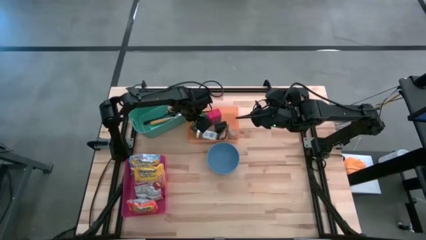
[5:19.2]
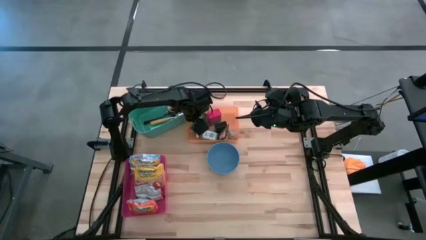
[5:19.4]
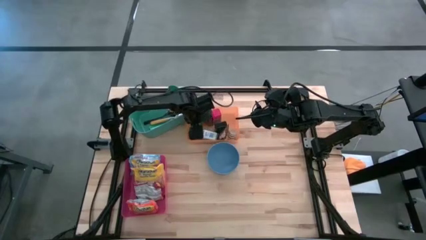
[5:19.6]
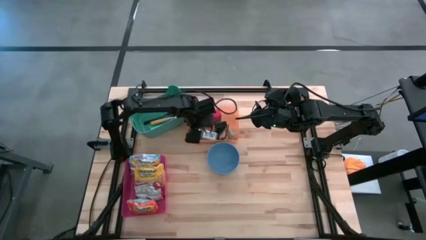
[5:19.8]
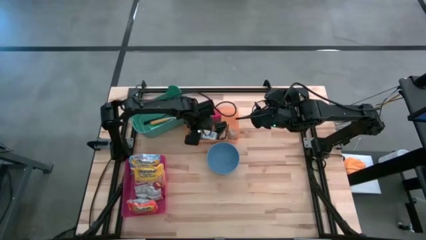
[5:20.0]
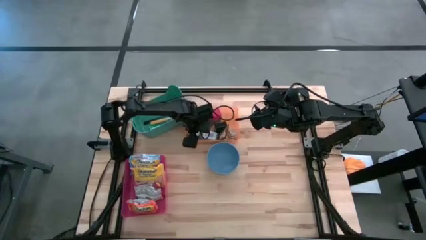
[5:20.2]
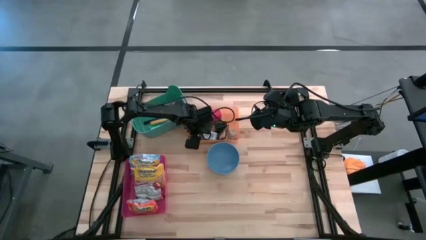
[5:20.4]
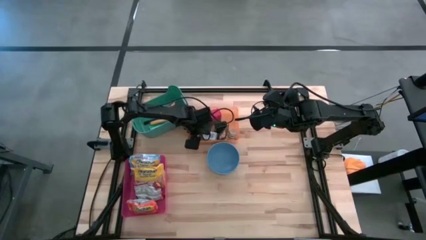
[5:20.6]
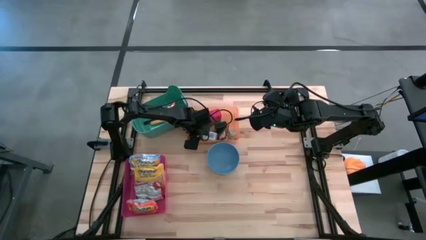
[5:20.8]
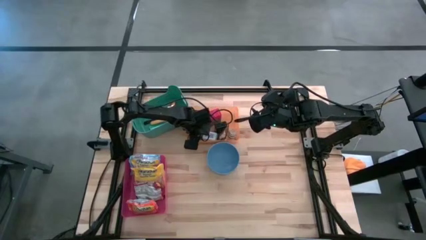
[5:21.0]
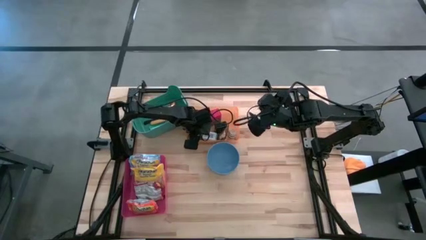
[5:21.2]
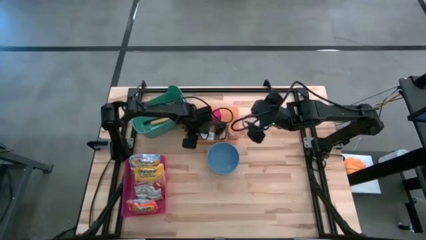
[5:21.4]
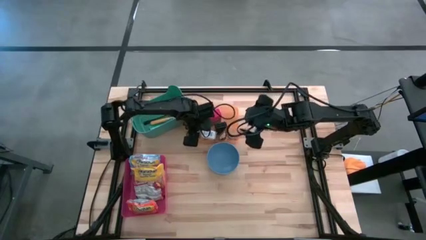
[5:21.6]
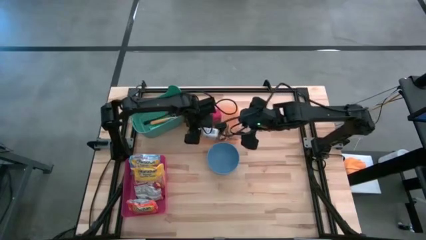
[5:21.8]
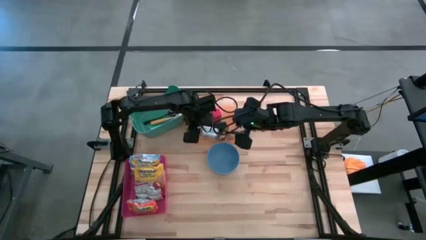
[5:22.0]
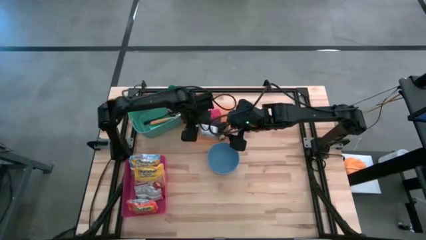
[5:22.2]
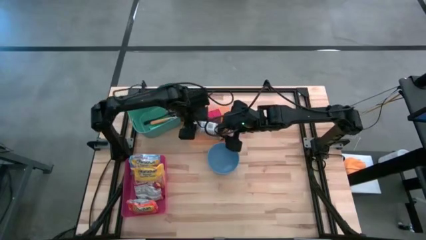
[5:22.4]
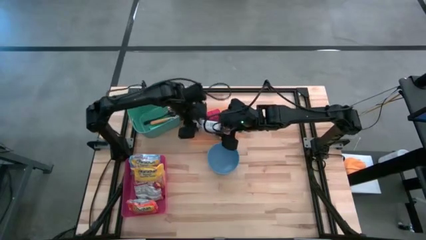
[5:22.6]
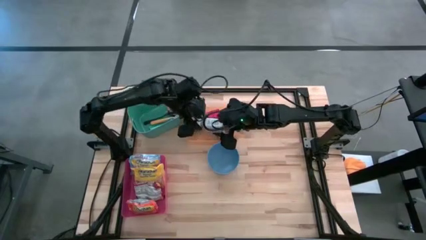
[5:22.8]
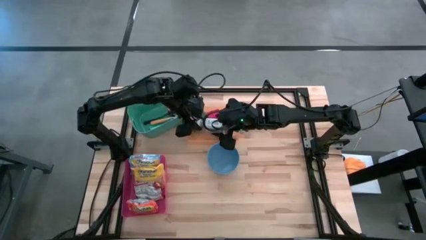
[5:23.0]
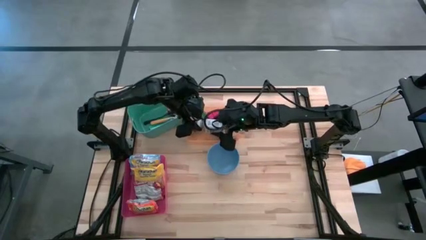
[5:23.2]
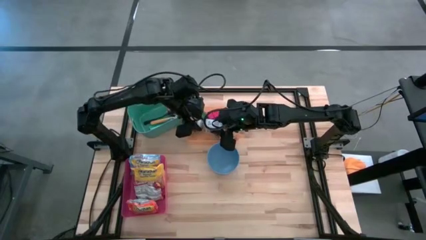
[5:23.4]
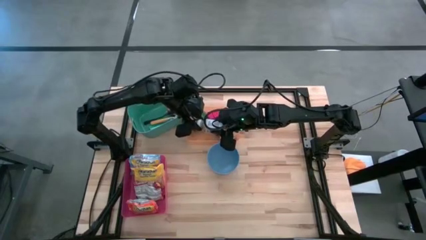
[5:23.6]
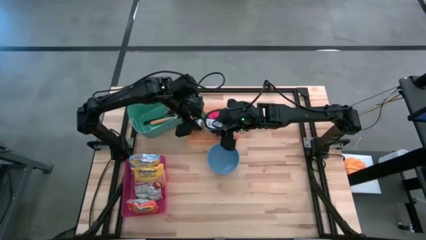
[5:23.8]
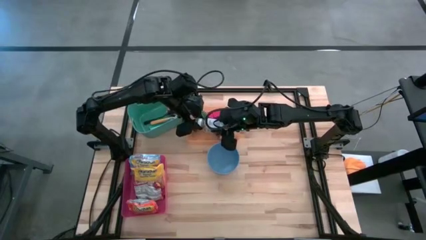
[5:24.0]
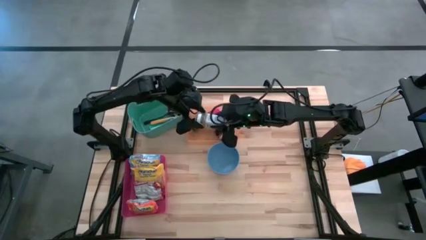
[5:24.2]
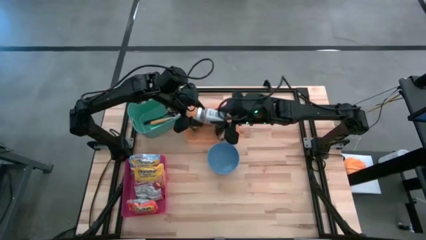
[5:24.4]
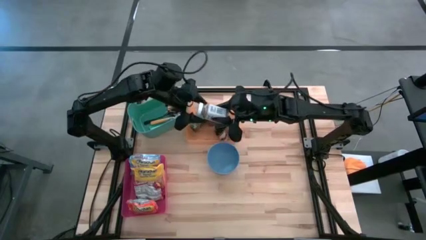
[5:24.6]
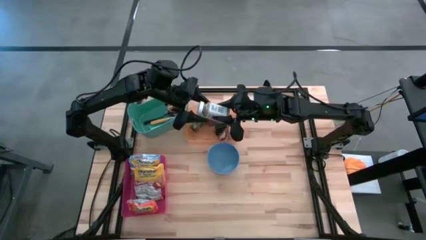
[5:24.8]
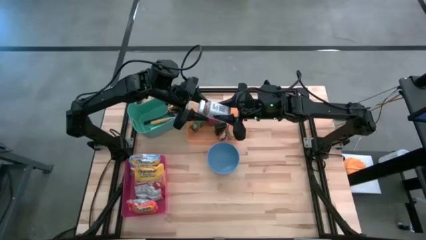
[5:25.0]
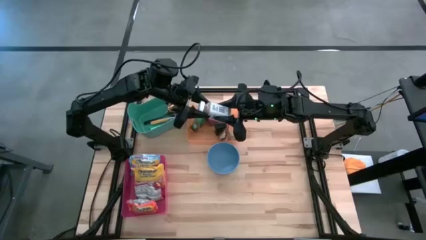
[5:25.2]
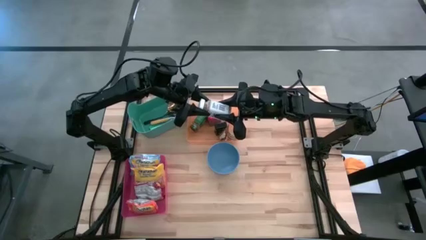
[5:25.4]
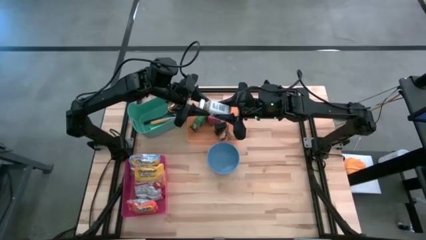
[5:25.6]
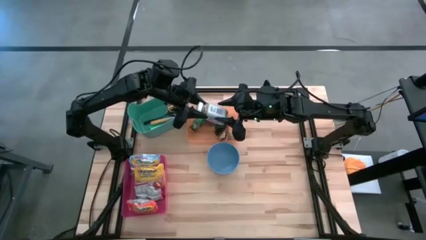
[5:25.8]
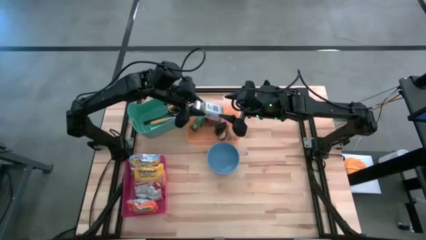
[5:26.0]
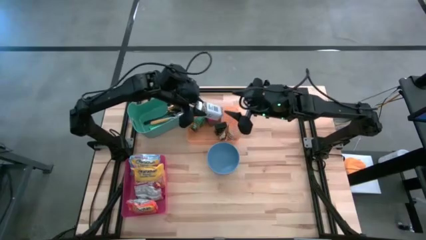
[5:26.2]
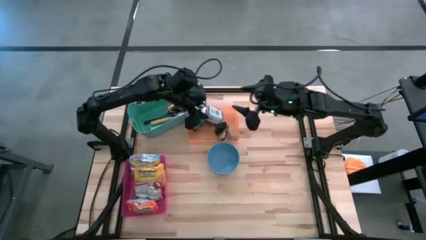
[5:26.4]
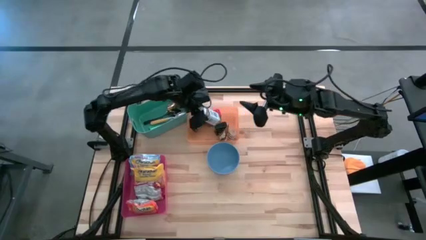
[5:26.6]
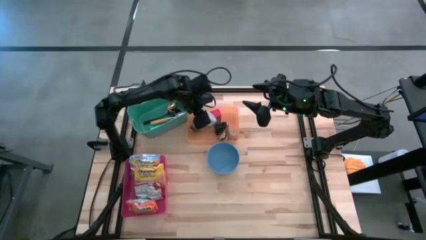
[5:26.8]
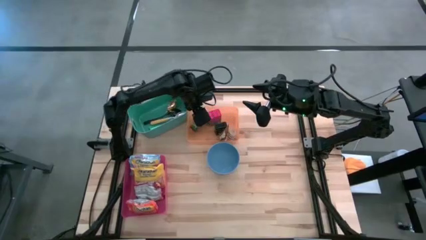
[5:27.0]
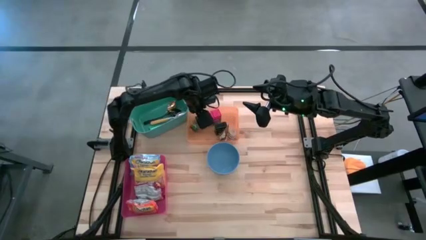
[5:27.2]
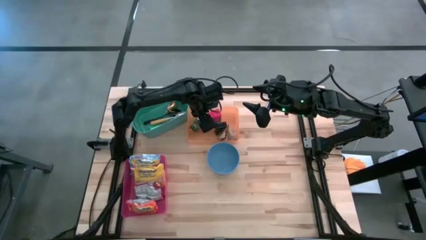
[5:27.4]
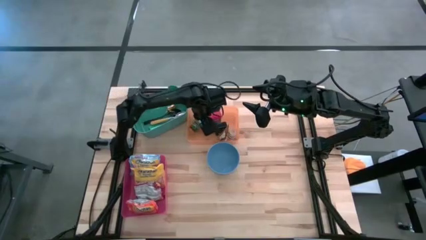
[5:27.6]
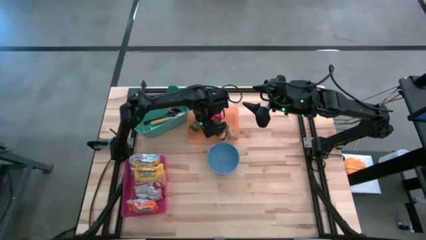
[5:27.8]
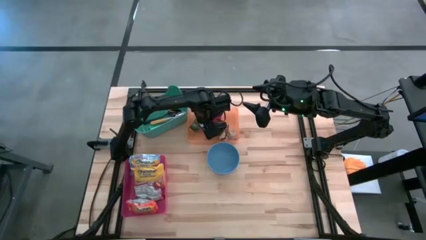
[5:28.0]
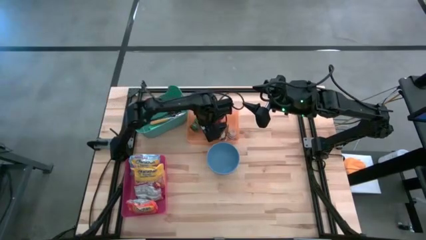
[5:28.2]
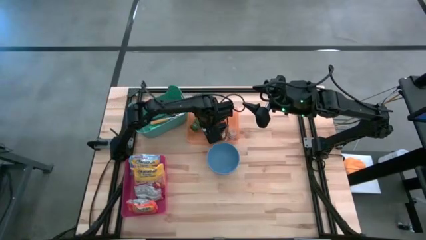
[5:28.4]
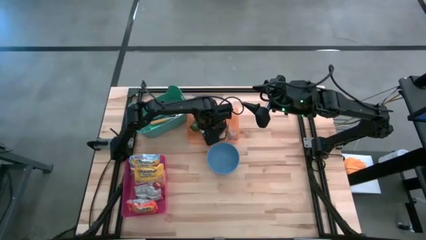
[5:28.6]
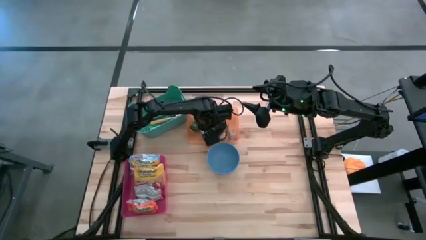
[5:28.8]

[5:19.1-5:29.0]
Adjust the white spice bottle in the orange bin

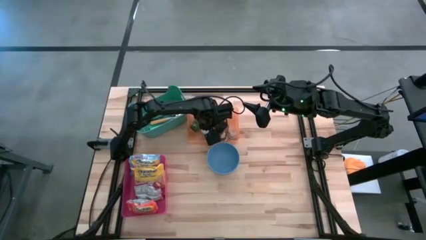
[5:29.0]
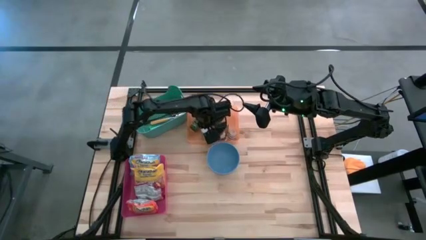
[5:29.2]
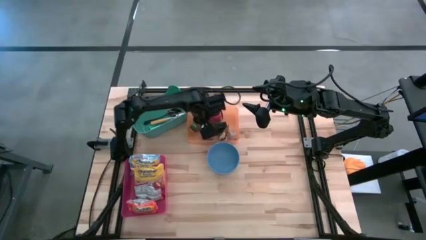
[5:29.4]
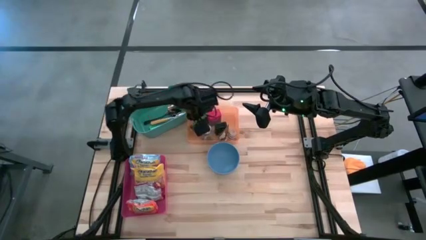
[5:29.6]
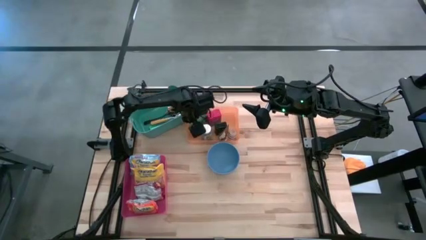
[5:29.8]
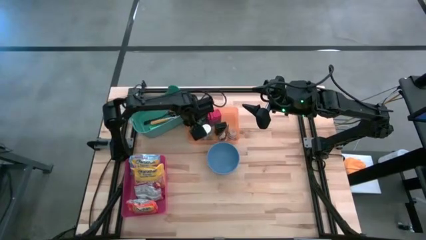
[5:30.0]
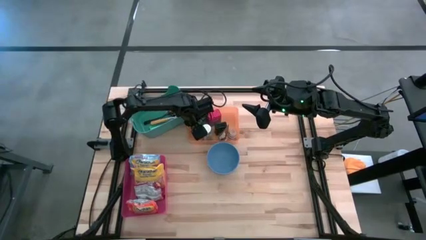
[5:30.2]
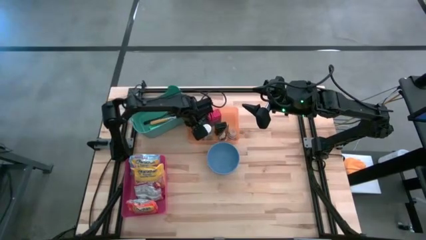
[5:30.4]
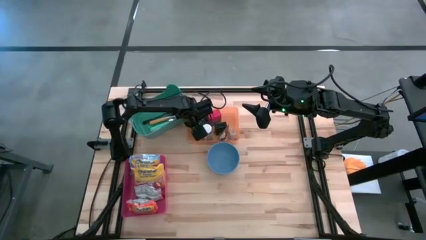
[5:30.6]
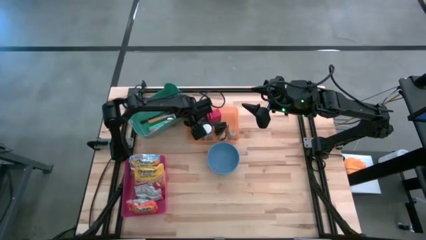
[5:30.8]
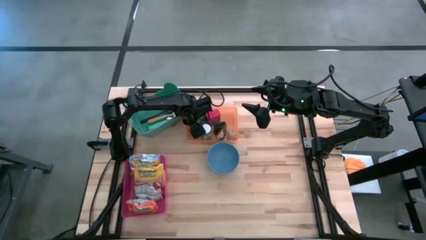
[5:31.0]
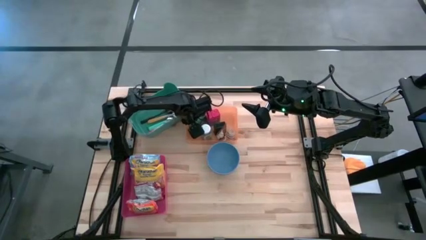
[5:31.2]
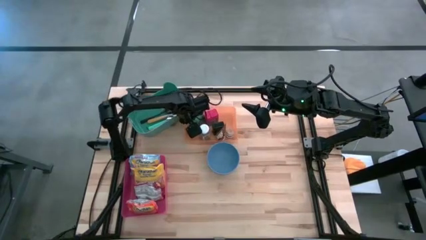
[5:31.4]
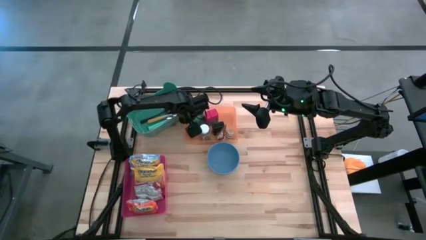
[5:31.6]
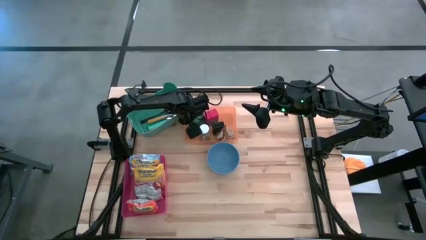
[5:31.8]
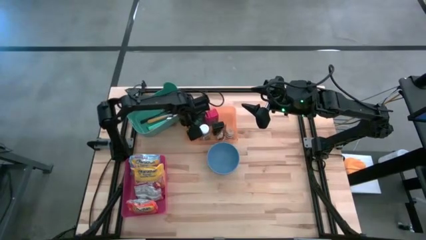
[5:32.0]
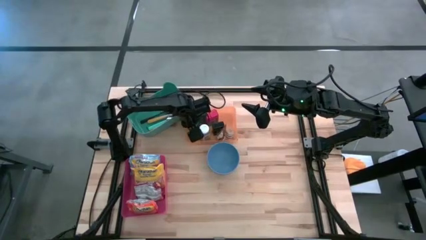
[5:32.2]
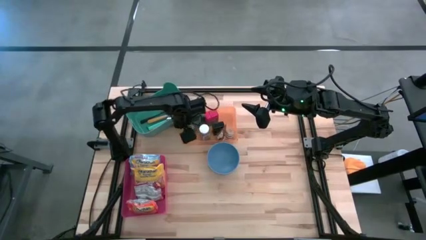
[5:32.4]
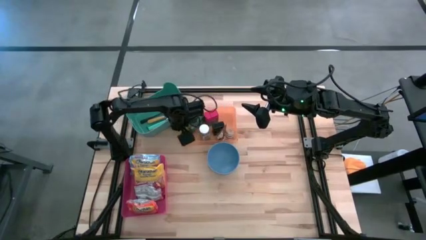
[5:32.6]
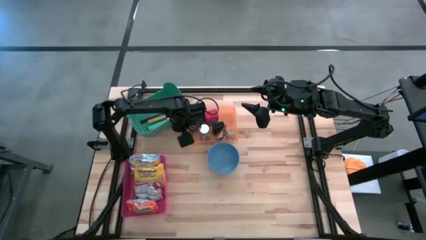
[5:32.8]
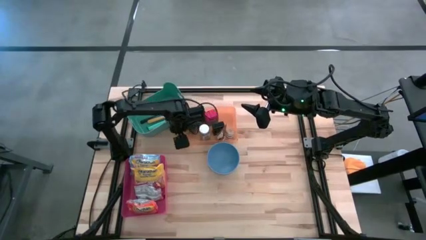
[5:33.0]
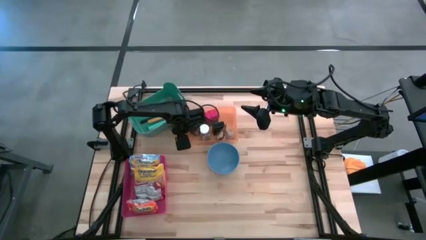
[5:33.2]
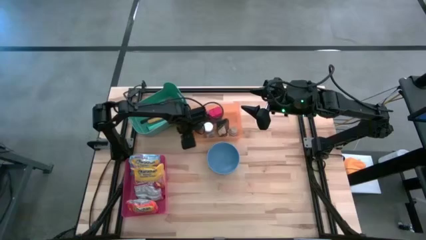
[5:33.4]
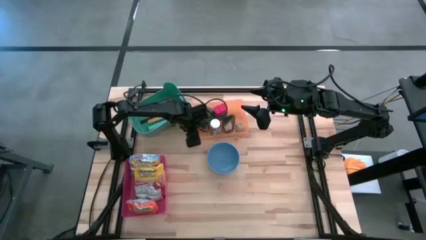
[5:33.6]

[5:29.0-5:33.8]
Adjust the orange bin on the table
